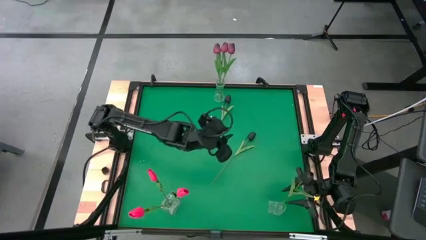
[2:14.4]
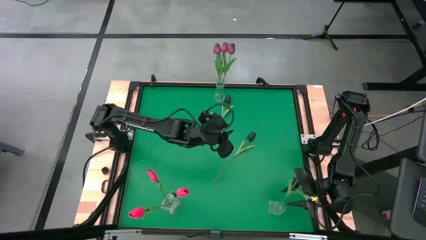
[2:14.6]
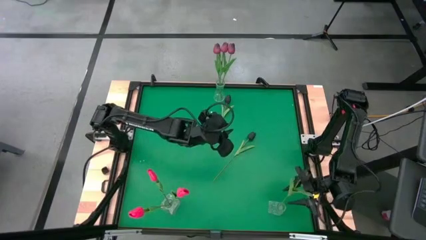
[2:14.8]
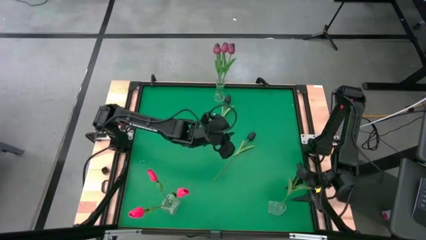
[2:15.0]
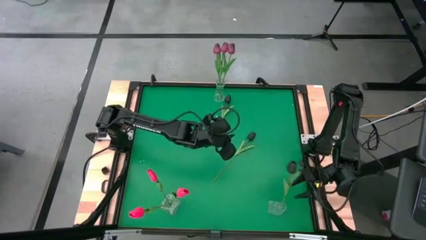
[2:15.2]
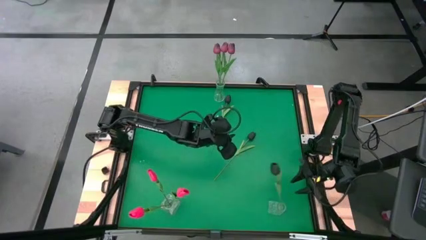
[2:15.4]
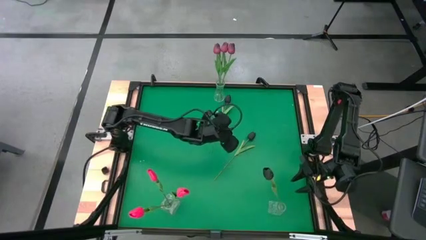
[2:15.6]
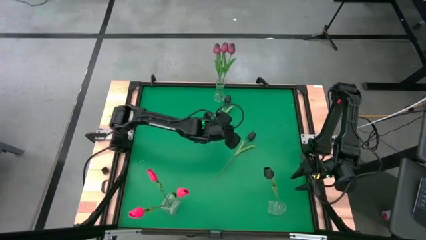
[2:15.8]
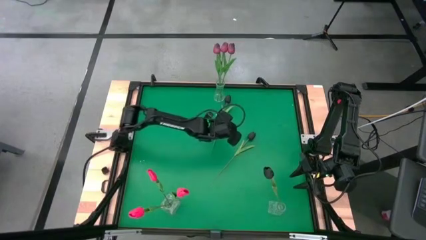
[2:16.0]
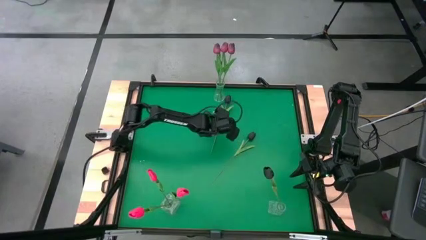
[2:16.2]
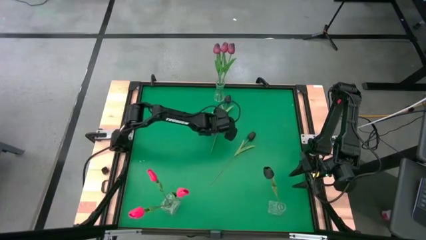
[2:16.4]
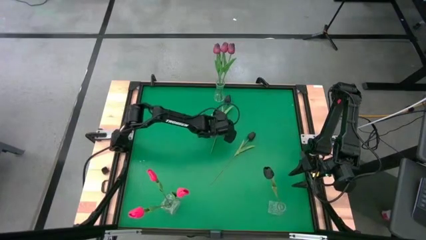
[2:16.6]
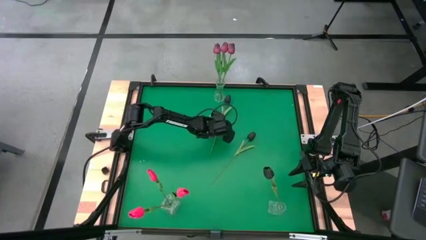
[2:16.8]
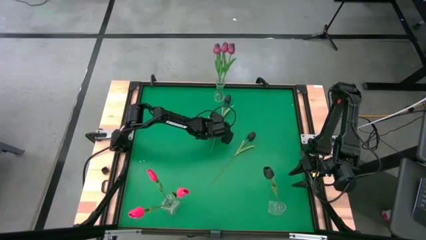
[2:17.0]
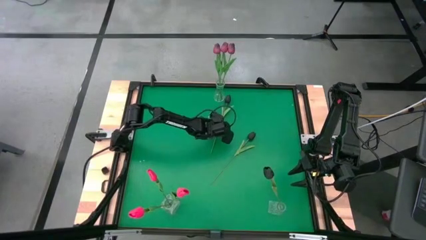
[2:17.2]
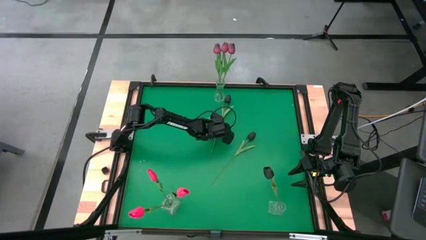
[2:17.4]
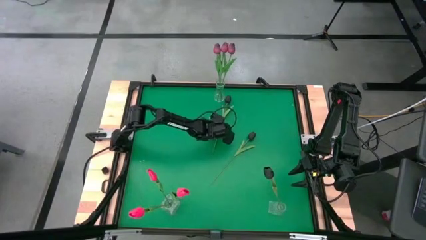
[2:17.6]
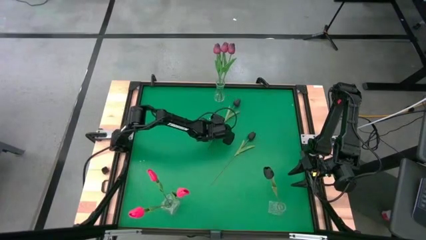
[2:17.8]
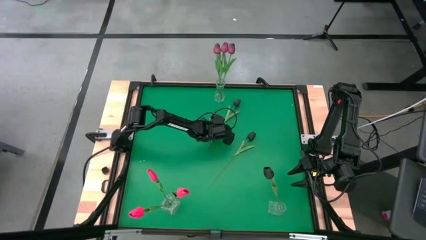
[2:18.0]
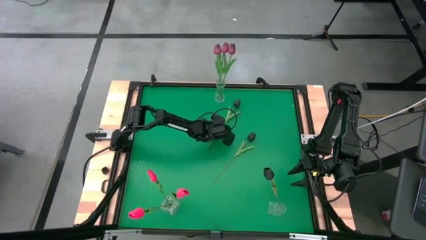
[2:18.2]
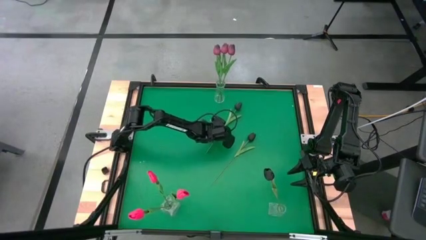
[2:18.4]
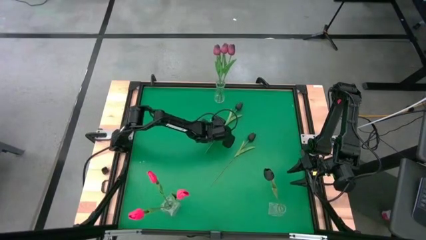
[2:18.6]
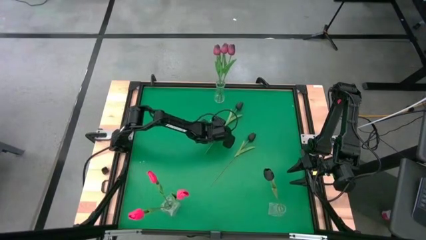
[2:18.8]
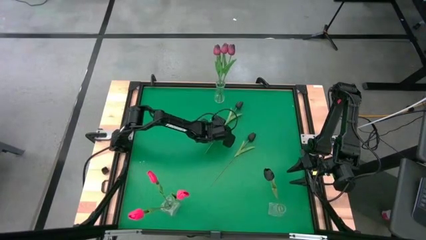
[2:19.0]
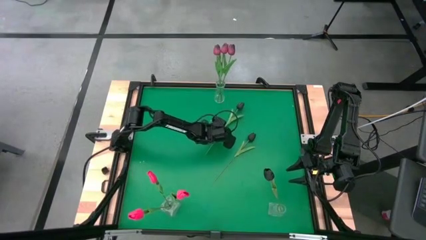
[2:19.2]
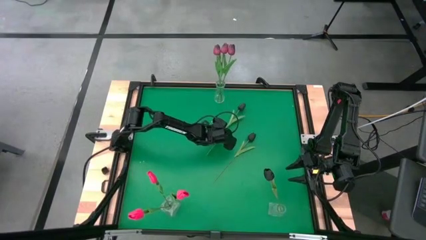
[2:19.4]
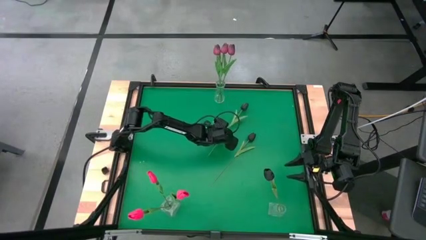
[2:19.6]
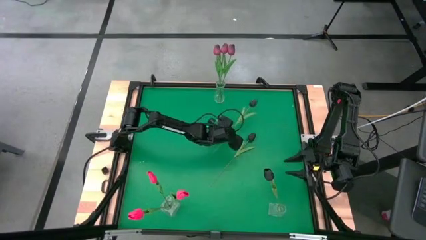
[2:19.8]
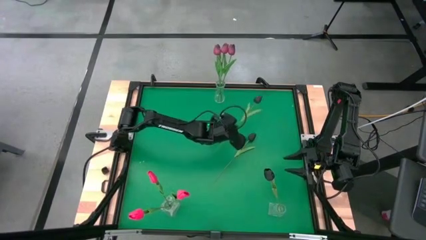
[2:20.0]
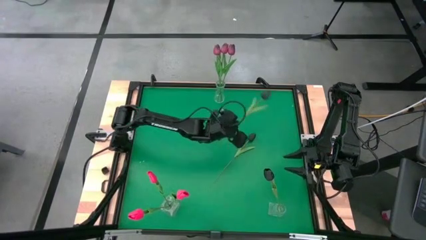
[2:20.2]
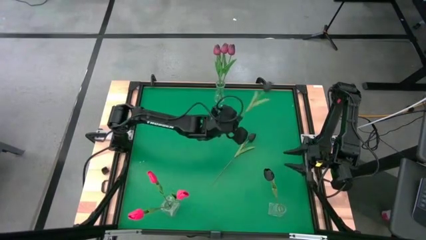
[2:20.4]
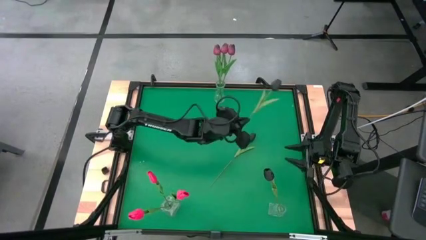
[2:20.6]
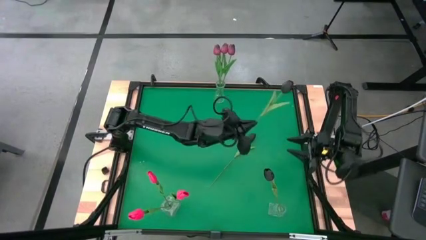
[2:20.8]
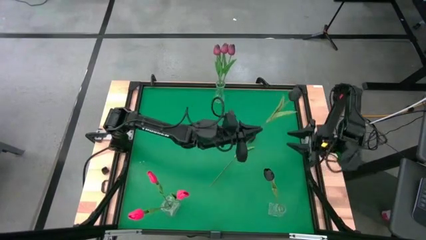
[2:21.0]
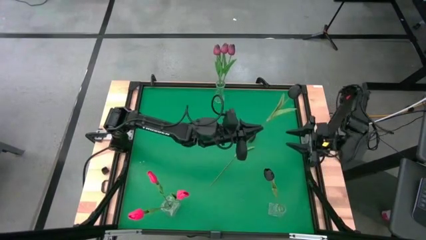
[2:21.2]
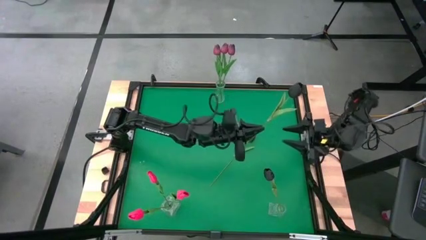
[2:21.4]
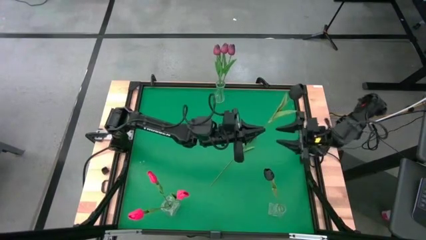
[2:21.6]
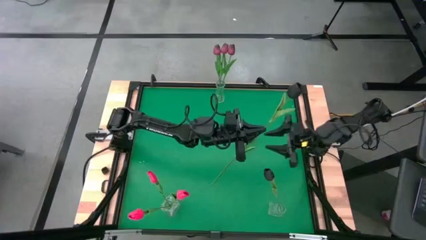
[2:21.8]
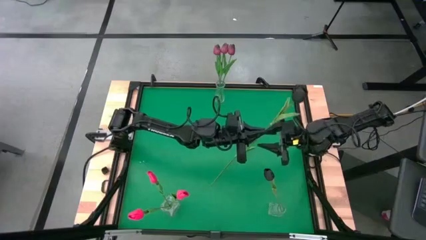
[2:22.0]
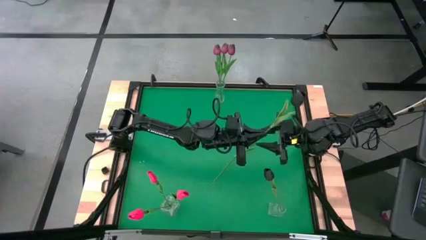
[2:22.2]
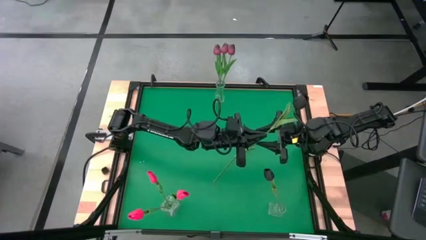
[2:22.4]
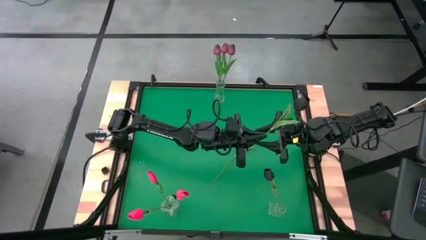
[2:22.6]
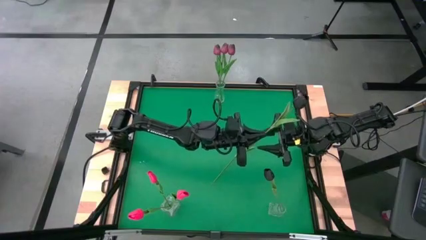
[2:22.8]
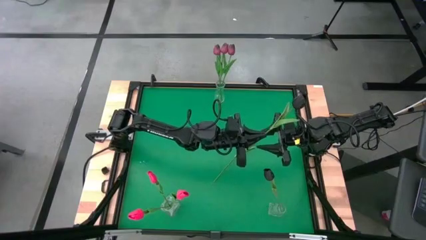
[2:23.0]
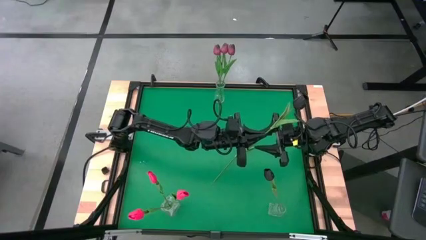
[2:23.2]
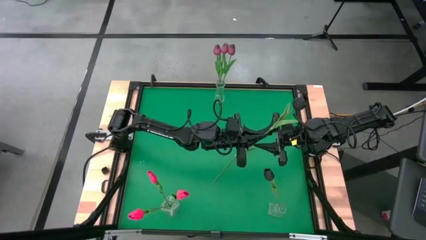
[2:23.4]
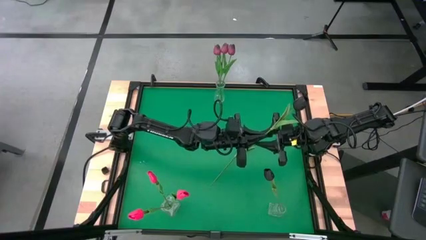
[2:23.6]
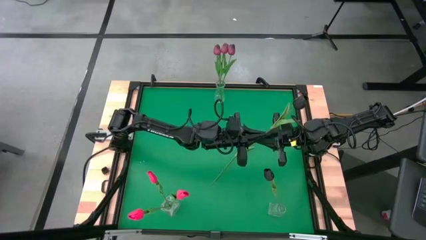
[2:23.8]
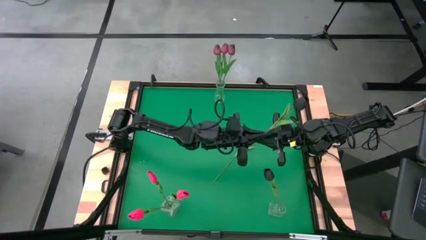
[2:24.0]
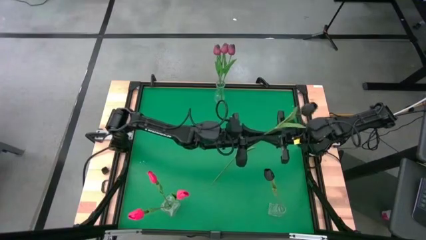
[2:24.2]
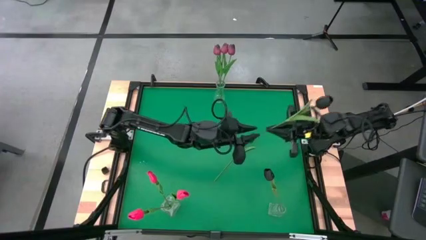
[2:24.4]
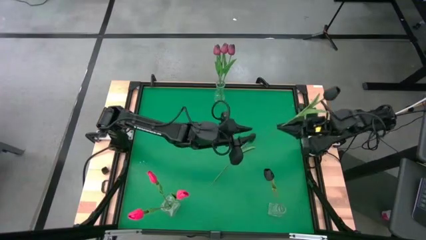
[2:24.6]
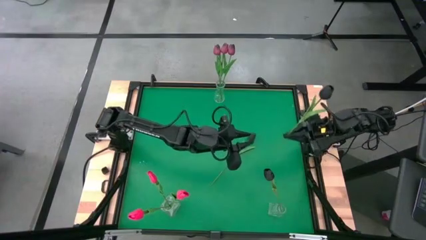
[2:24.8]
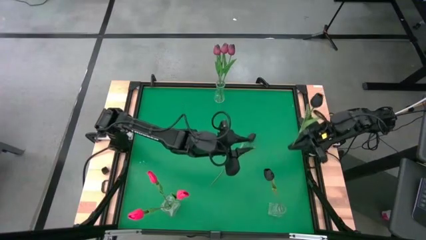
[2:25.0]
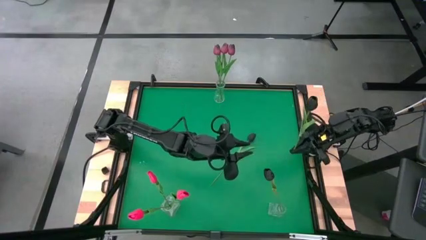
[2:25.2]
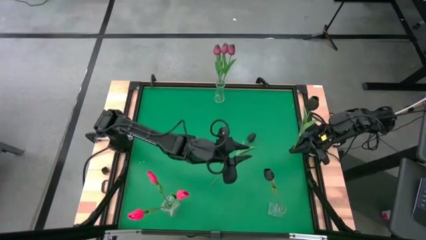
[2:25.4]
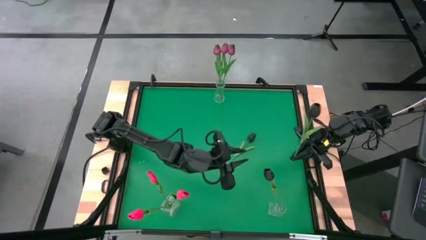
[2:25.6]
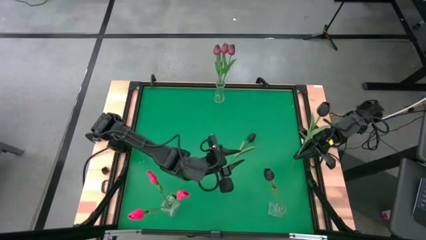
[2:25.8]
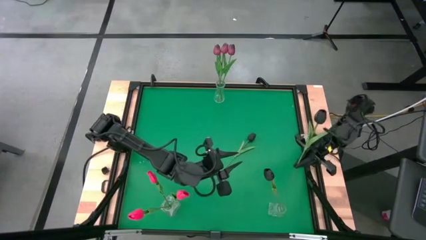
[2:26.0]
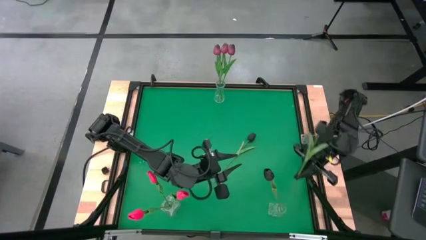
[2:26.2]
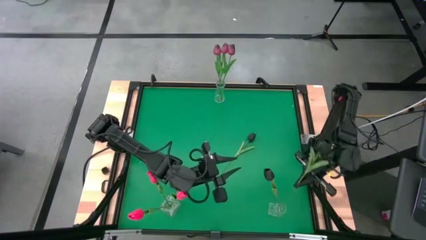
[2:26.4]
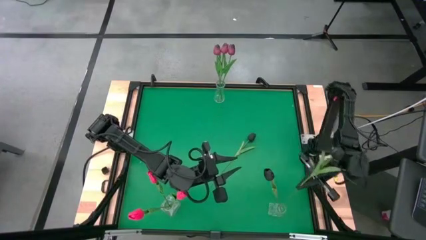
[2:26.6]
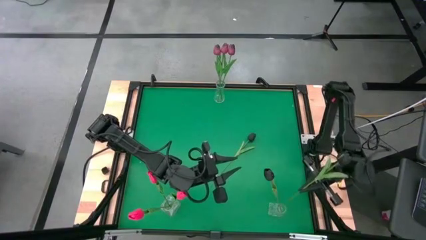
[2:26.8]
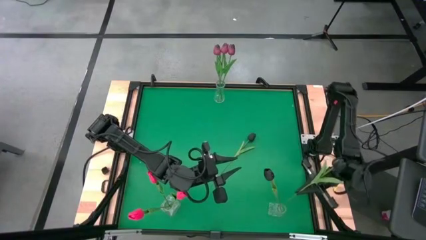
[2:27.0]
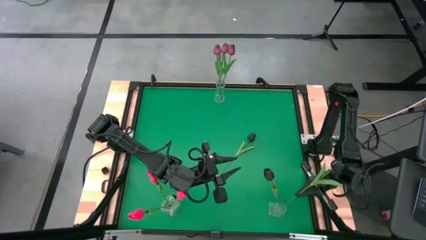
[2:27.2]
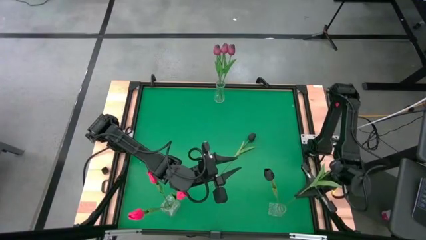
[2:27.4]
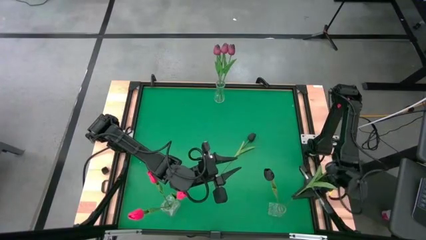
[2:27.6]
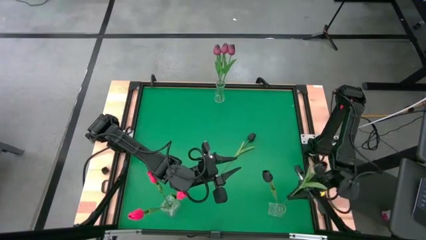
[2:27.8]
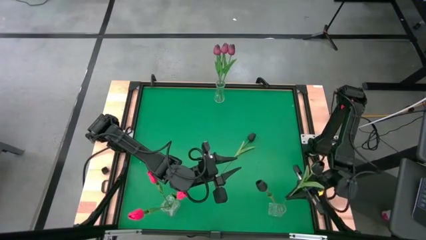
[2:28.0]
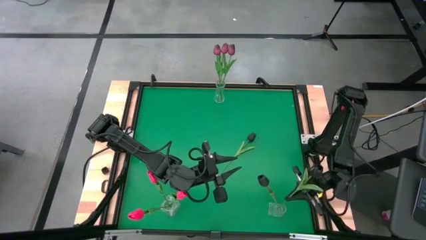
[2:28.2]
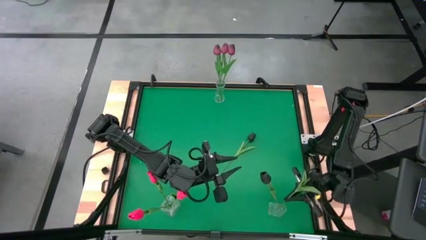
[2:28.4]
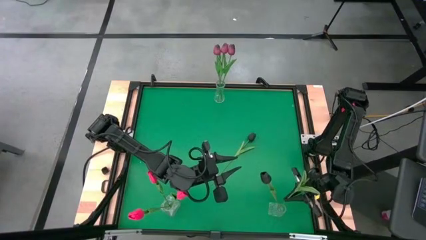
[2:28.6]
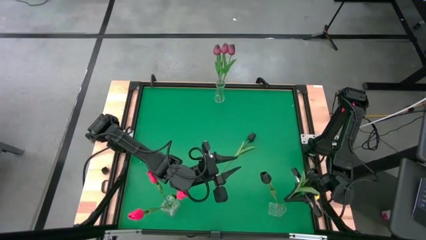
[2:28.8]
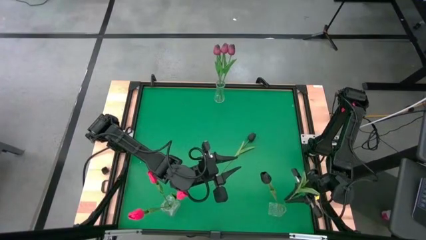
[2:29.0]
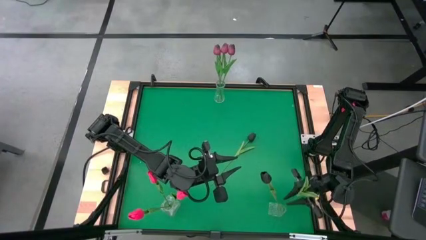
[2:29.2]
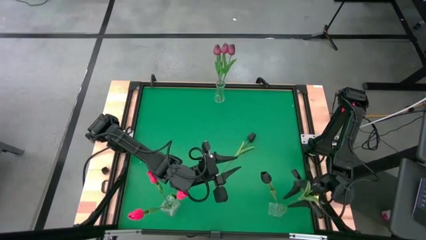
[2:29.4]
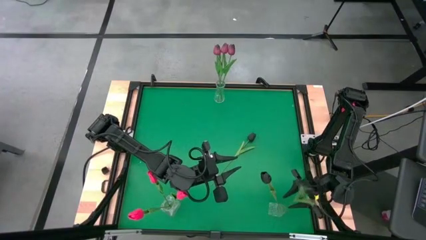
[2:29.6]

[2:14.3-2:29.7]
Task: Sort flowers into vase by color
Put the top black tulip into the bottom right transparent vase
